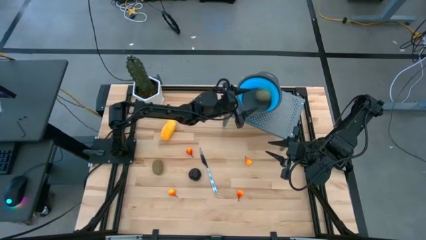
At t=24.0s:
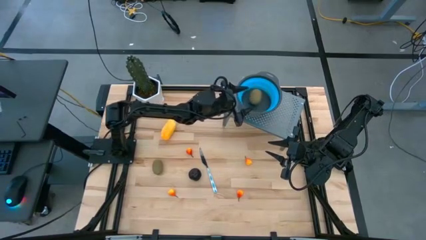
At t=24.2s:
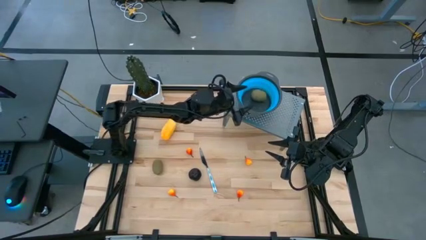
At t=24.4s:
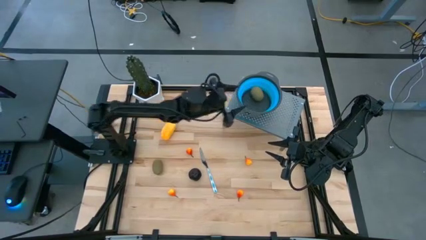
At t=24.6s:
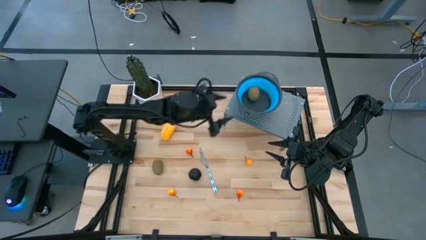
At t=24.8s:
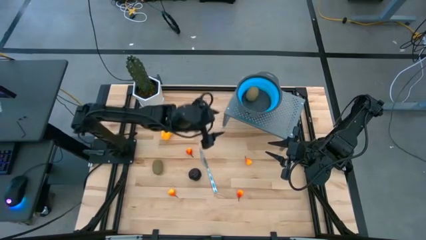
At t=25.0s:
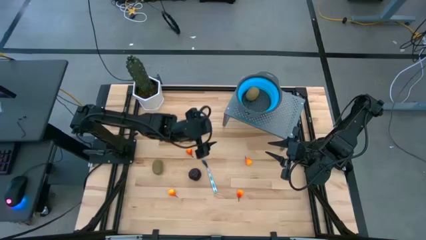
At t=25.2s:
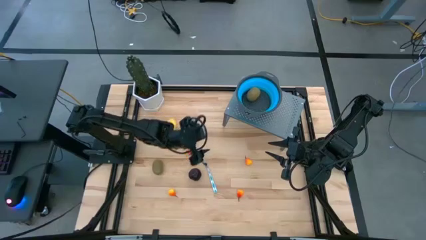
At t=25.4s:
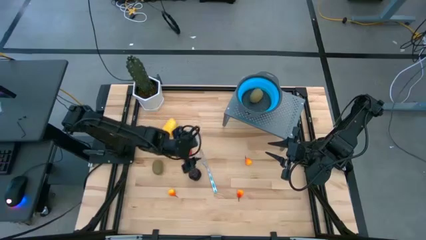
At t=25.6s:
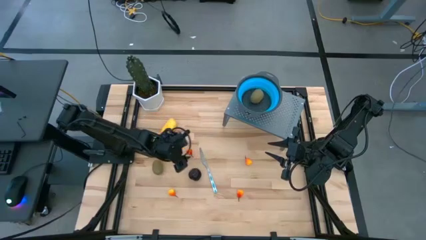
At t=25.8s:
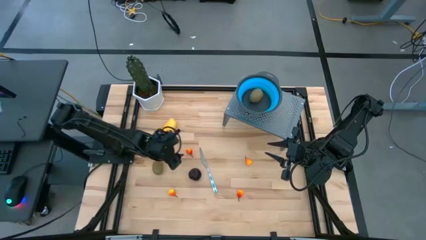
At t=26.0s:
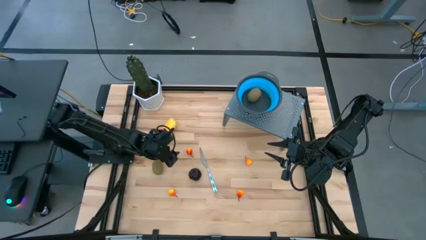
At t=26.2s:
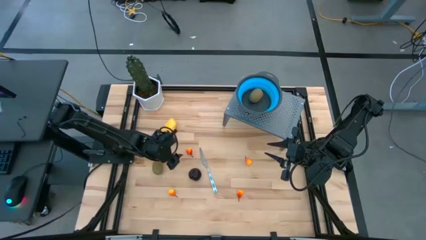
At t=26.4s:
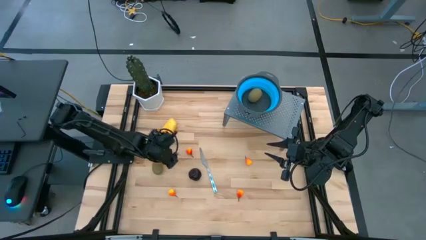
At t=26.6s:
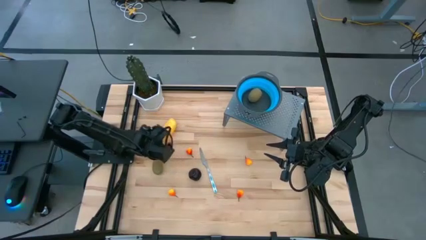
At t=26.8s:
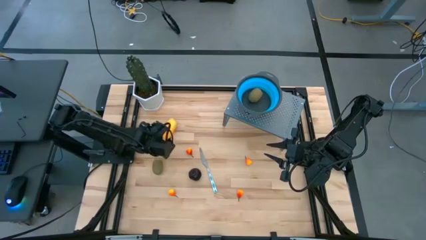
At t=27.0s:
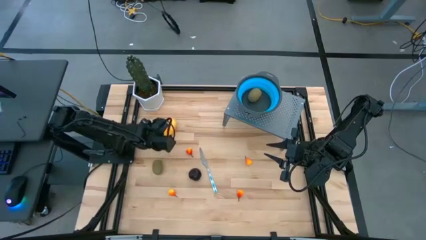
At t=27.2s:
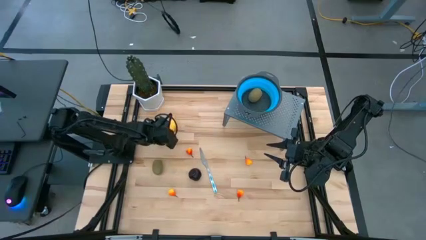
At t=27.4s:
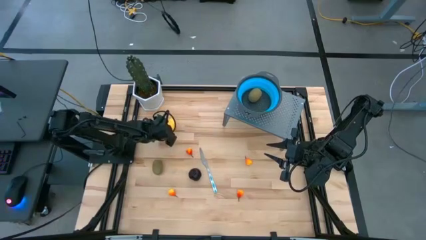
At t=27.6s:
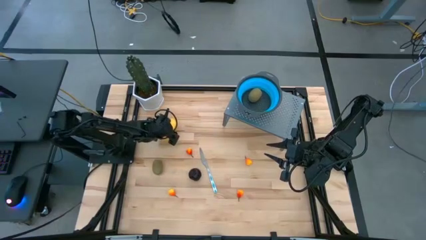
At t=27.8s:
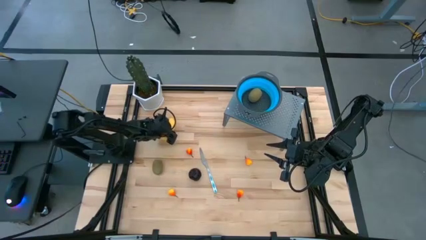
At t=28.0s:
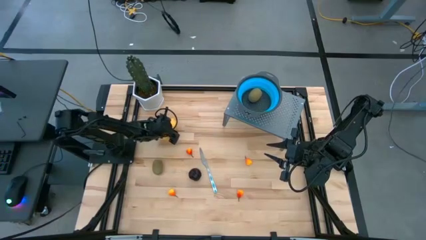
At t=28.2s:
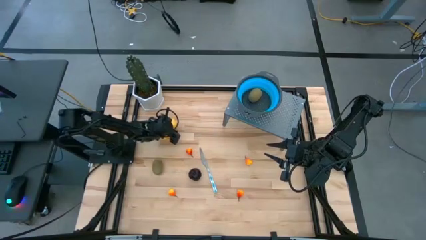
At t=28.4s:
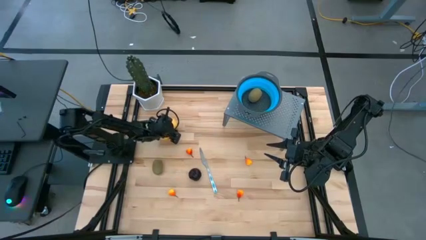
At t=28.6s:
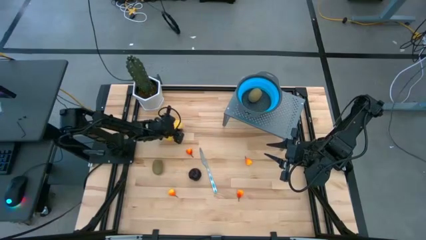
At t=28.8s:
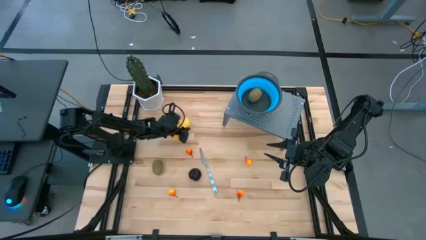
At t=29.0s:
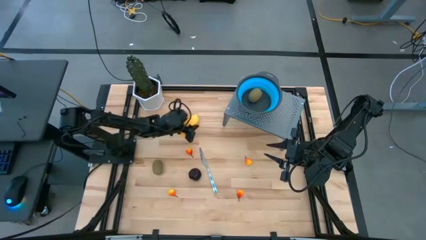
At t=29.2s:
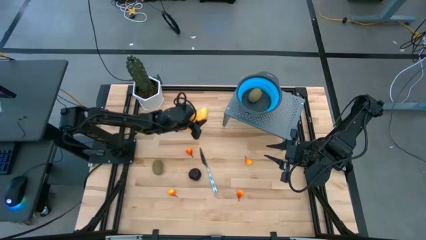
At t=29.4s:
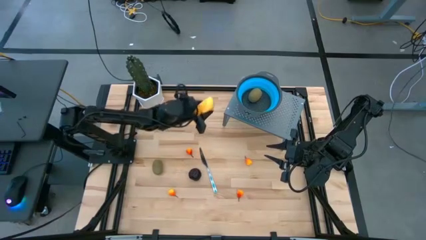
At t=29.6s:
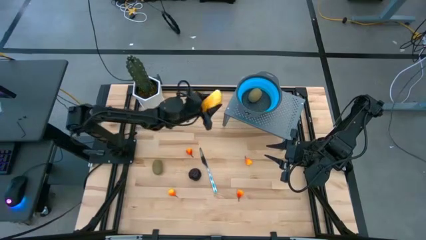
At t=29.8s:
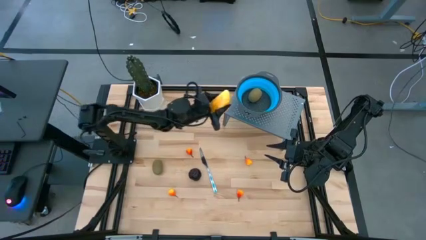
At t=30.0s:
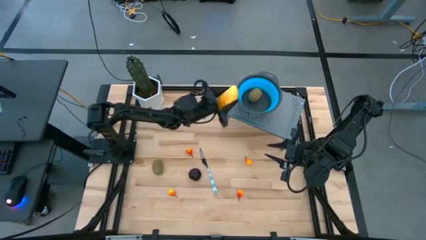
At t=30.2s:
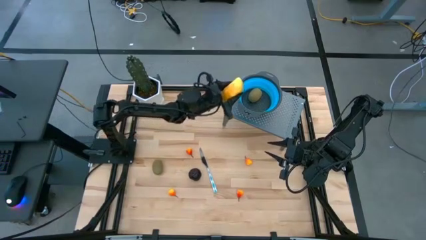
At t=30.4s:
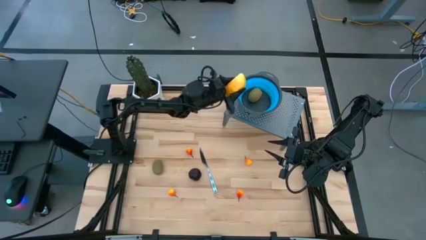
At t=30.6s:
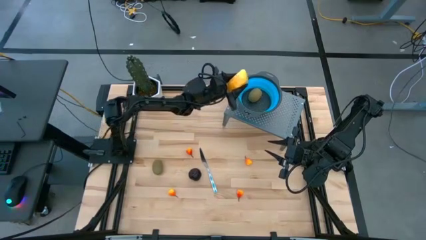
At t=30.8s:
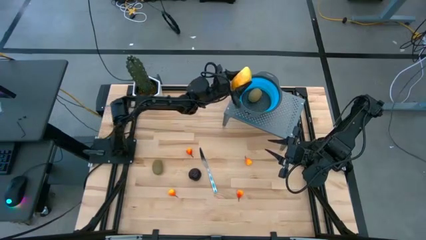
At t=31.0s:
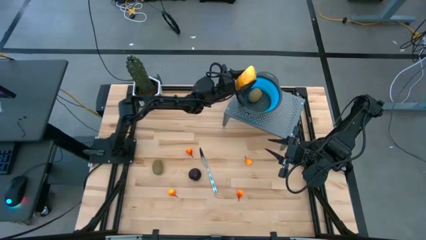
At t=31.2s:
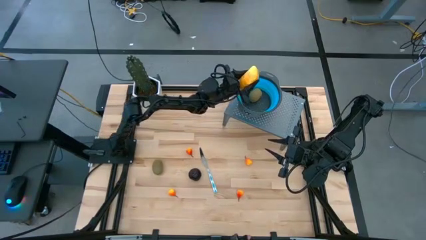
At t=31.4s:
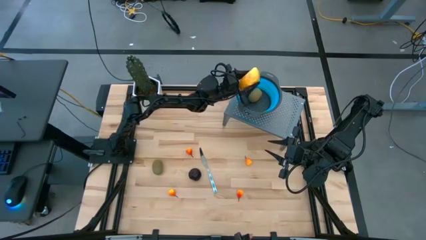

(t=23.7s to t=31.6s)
Task: Pick & Place Fruit
Put the yellow mango in the blue strainer bowl on the shelf

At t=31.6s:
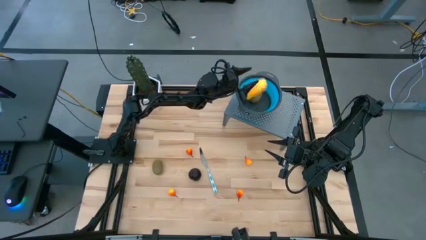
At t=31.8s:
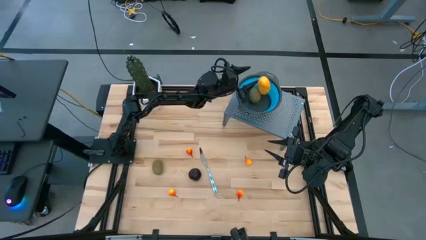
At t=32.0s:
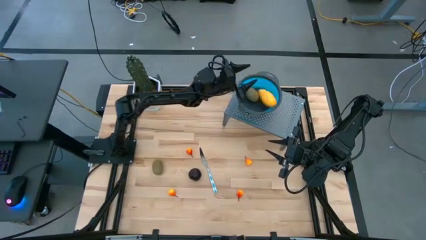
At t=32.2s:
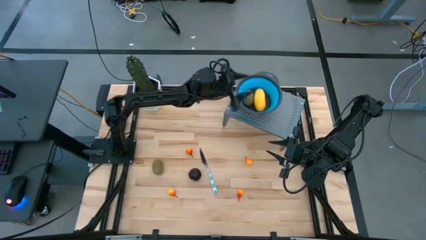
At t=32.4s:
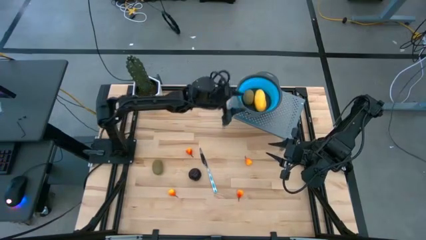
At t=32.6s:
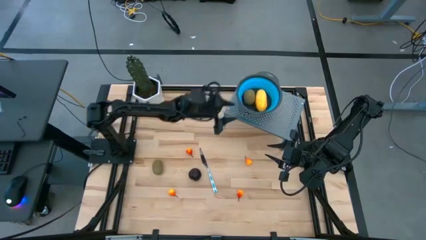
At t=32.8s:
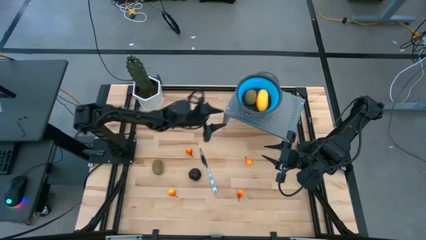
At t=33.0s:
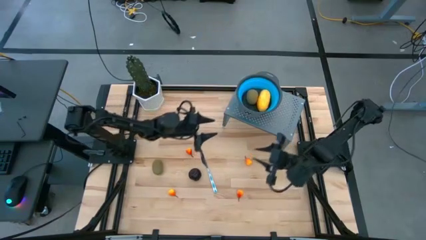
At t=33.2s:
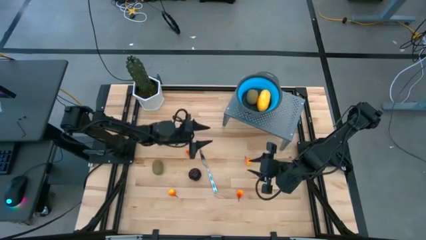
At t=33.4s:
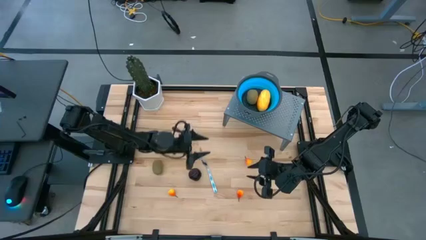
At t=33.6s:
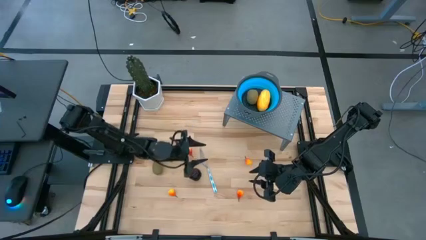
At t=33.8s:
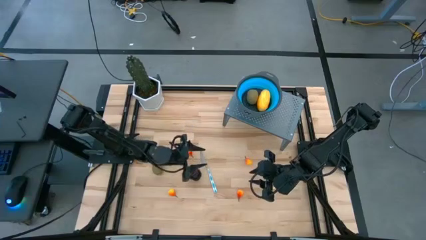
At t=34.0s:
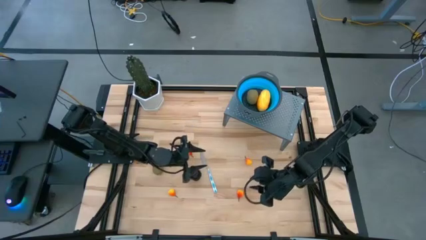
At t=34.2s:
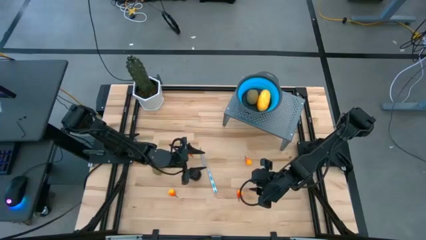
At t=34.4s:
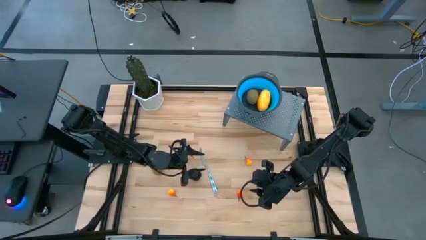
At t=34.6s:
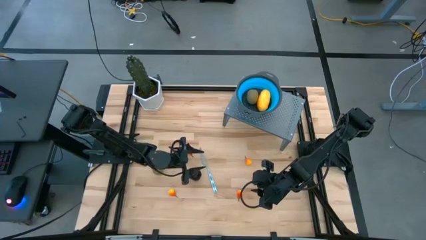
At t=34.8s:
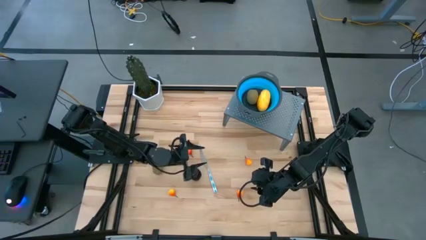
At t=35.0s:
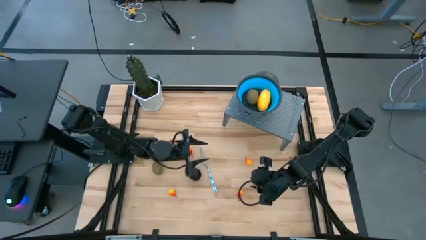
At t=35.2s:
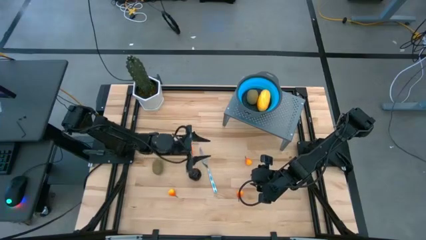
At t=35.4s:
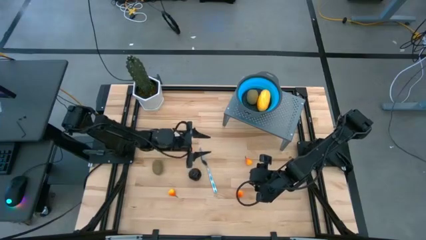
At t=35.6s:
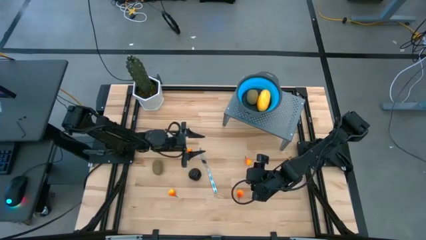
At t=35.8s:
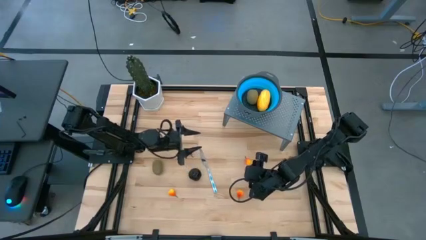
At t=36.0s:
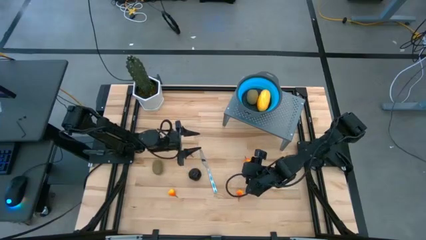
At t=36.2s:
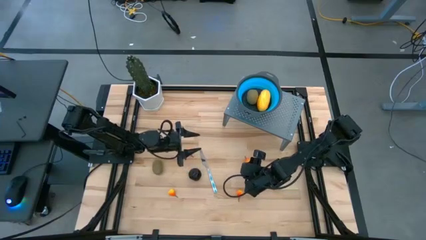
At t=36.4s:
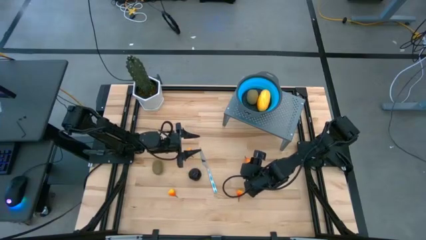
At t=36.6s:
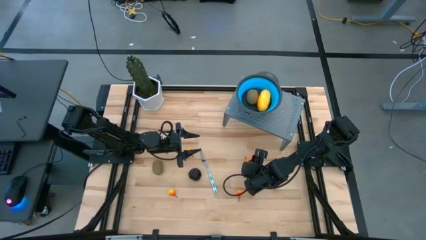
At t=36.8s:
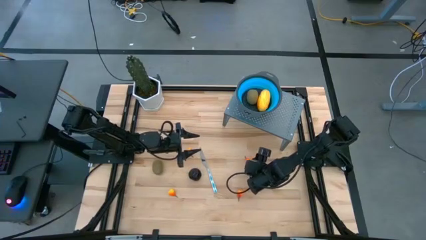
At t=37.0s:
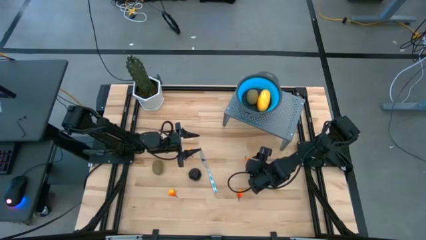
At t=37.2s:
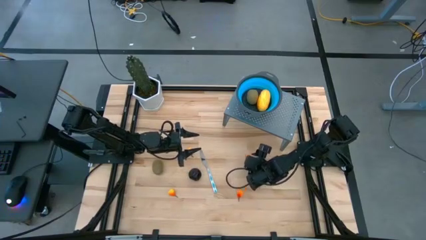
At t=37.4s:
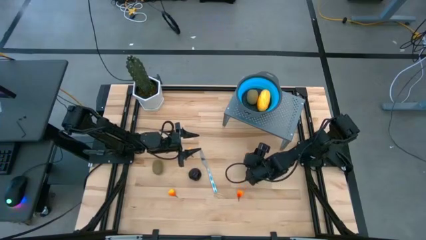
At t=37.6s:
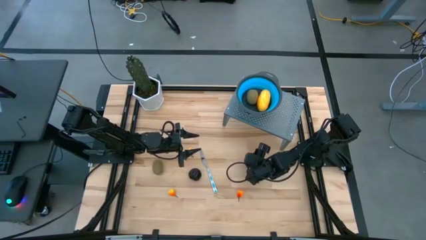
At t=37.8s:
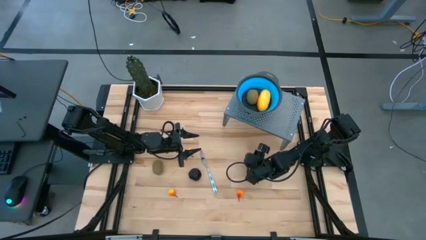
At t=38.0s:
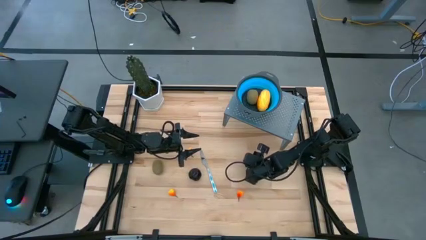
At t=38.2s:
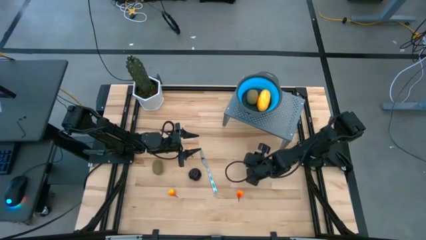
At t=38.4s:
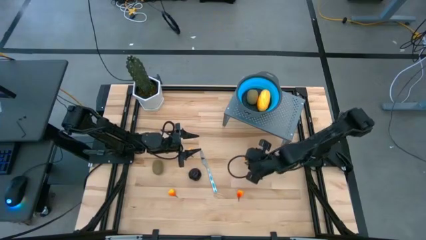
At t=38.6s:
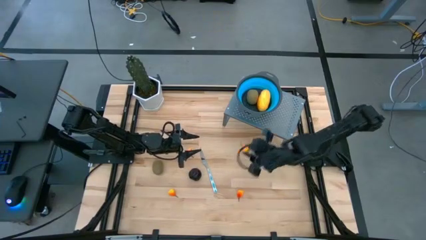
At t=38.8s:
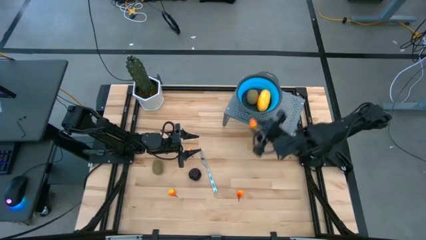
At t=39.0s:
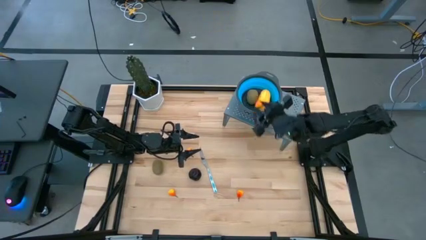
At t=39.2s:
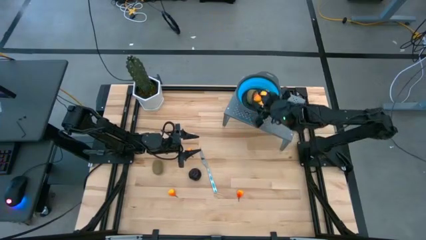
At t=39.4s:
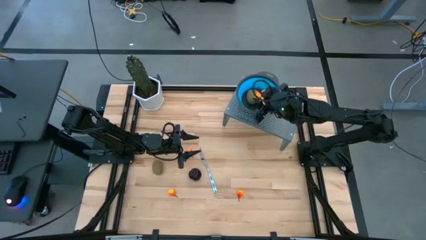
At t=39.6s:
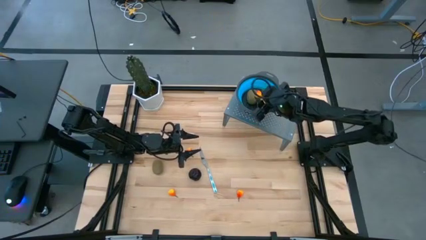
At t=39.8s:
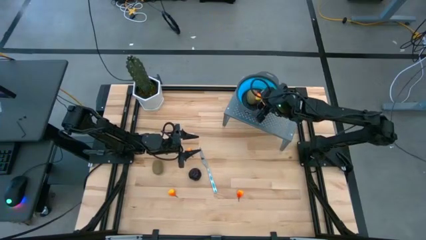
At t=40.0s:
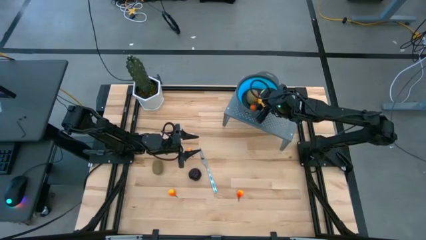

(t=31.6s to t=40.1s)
Put the orange peach in the blue strainer bowl on the shelf
